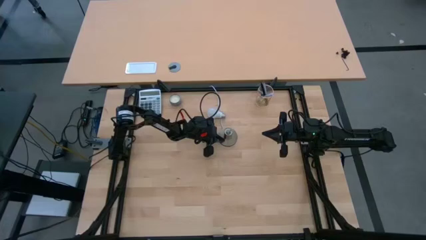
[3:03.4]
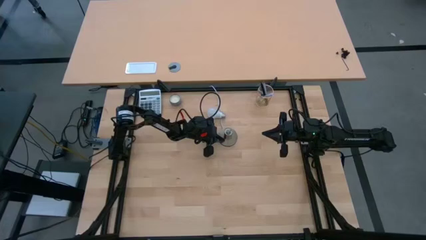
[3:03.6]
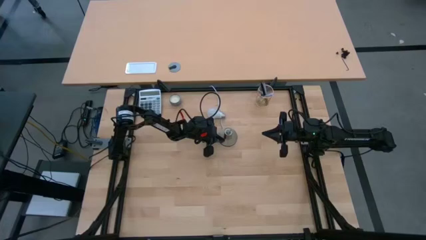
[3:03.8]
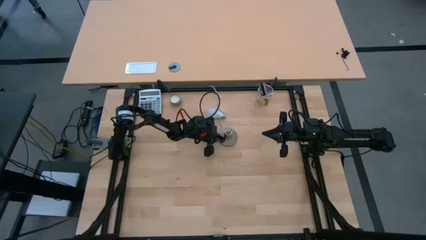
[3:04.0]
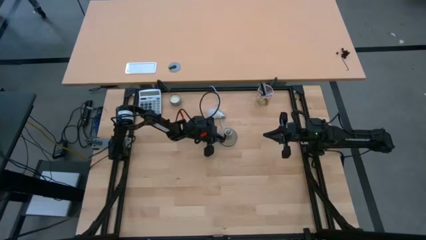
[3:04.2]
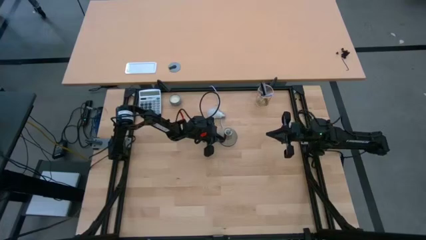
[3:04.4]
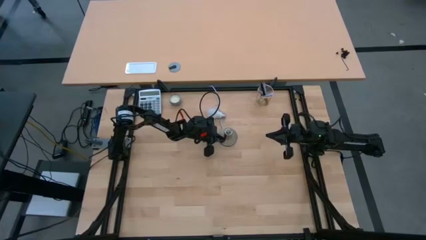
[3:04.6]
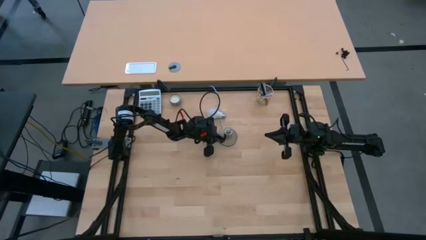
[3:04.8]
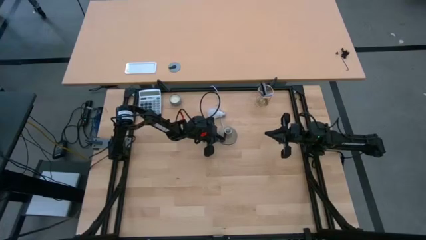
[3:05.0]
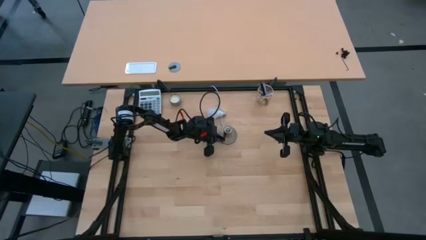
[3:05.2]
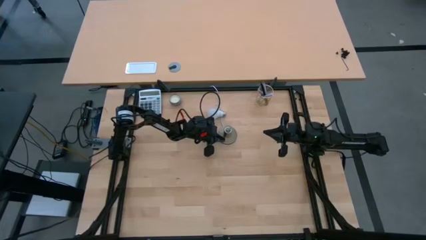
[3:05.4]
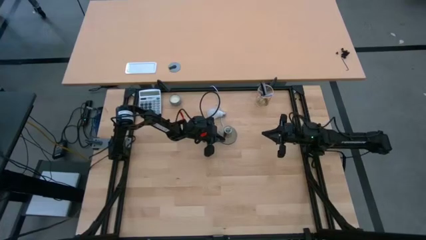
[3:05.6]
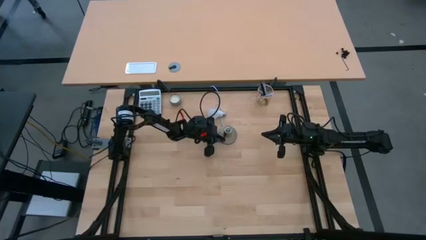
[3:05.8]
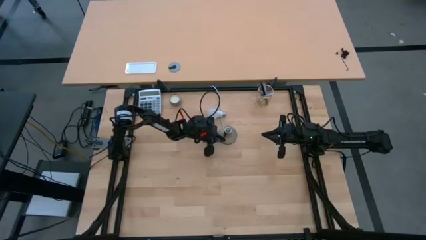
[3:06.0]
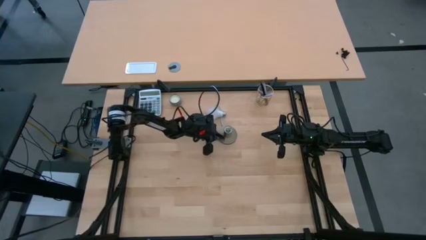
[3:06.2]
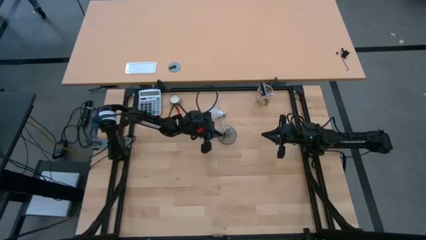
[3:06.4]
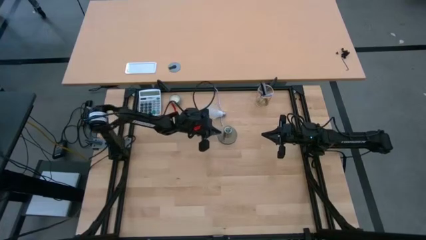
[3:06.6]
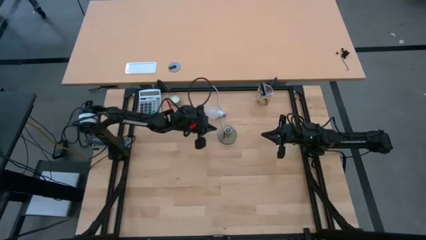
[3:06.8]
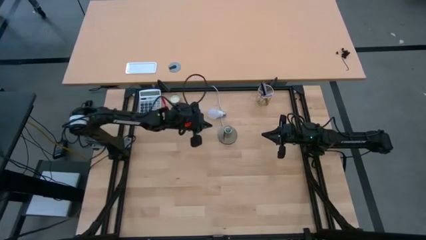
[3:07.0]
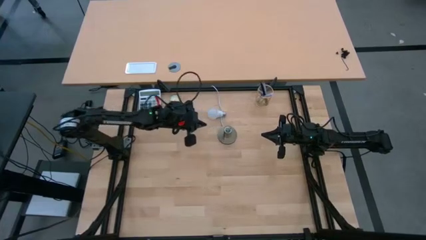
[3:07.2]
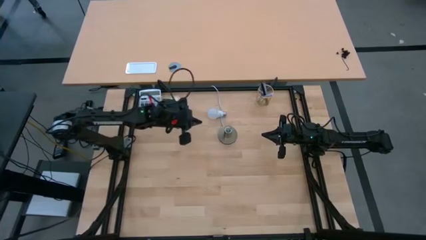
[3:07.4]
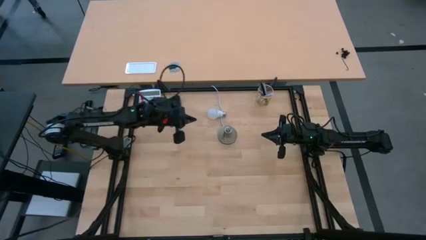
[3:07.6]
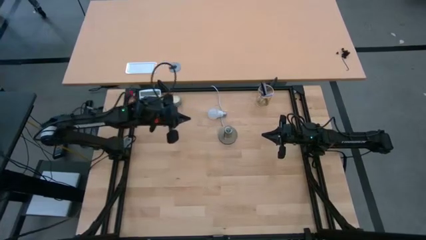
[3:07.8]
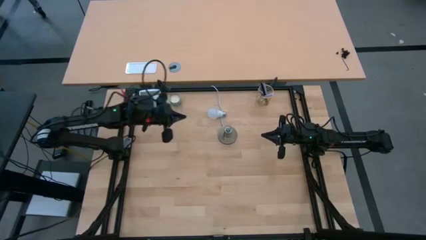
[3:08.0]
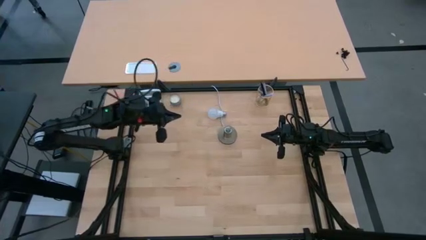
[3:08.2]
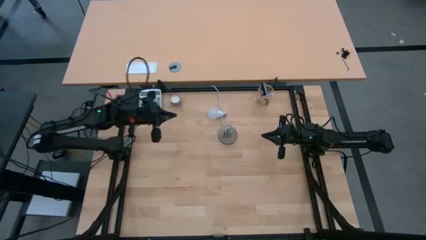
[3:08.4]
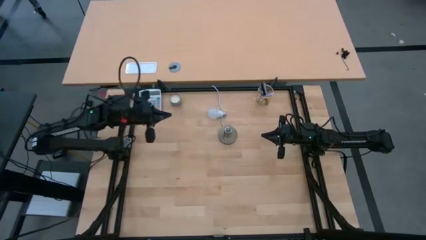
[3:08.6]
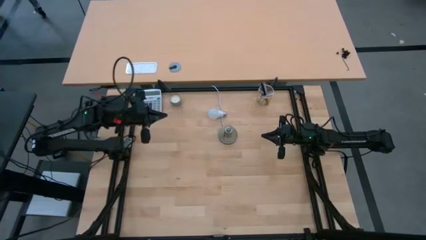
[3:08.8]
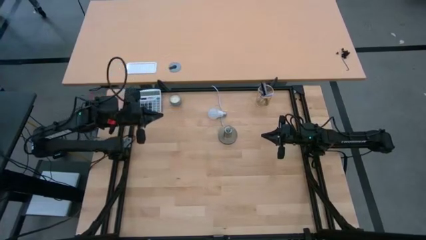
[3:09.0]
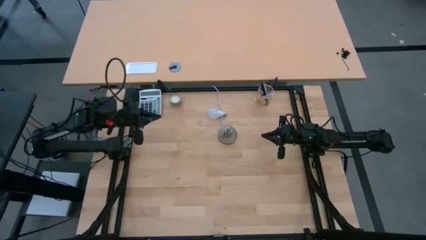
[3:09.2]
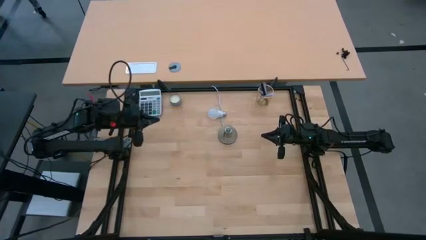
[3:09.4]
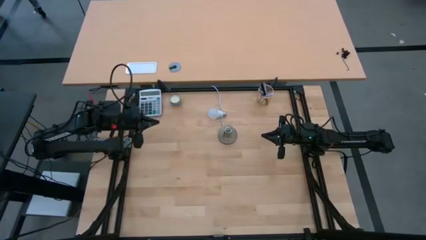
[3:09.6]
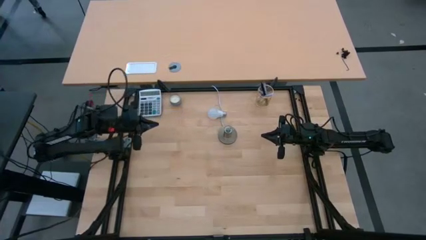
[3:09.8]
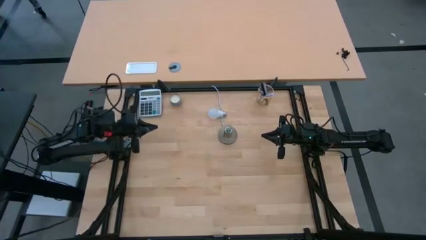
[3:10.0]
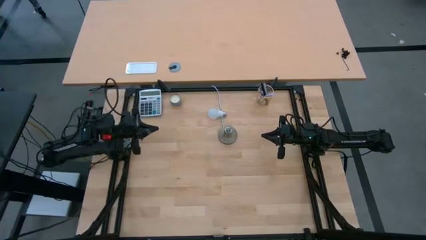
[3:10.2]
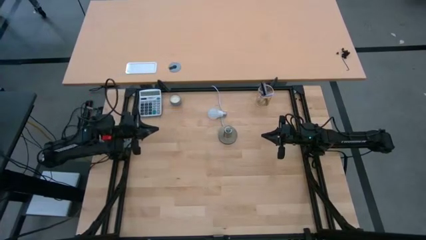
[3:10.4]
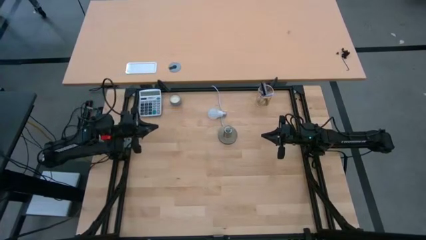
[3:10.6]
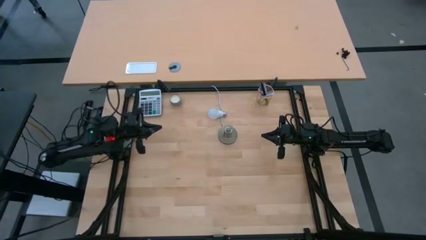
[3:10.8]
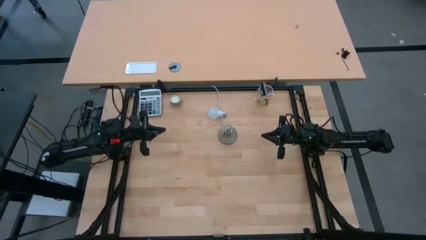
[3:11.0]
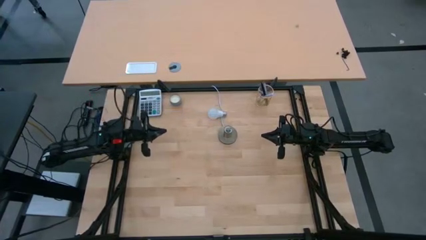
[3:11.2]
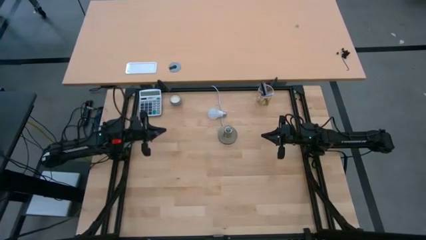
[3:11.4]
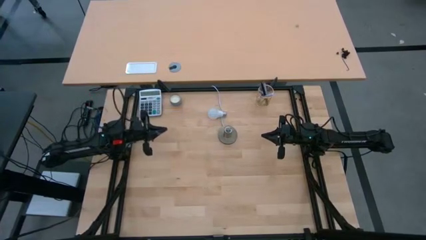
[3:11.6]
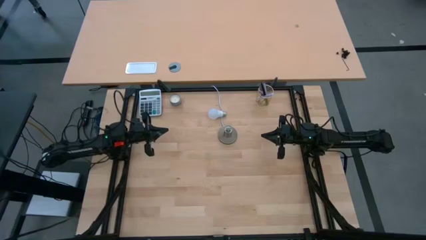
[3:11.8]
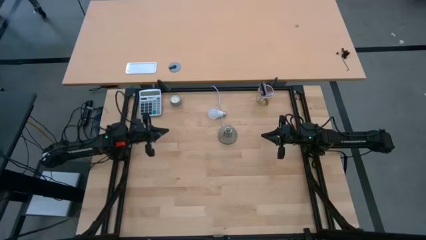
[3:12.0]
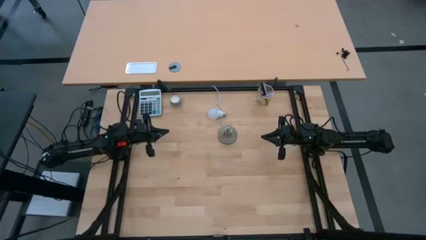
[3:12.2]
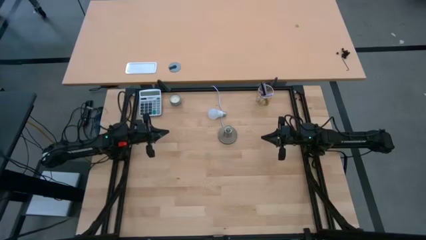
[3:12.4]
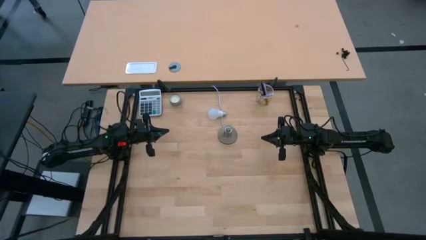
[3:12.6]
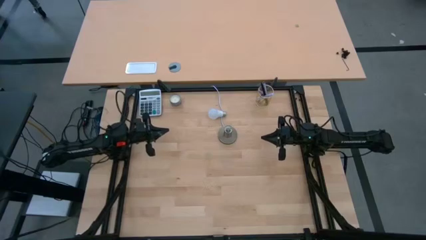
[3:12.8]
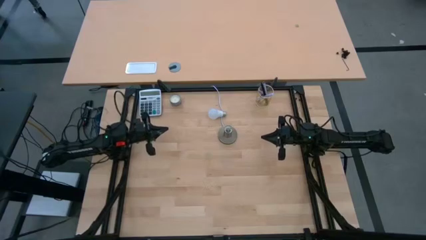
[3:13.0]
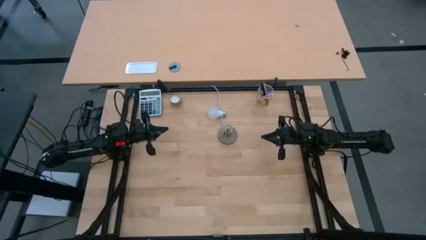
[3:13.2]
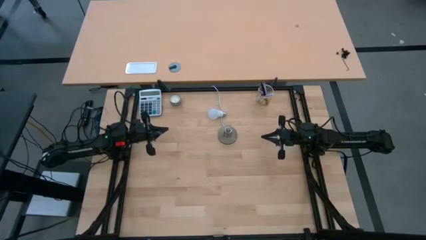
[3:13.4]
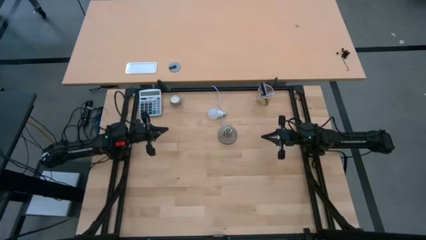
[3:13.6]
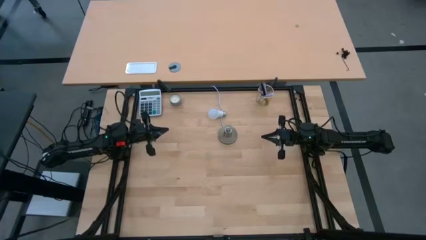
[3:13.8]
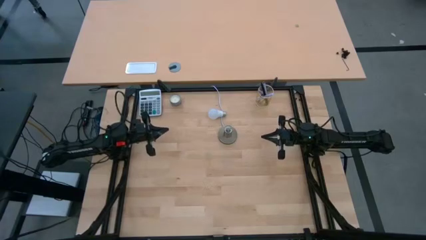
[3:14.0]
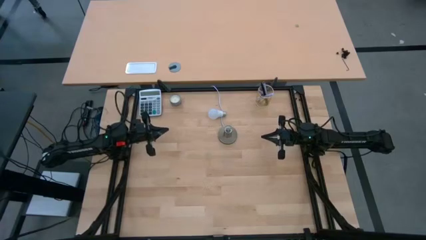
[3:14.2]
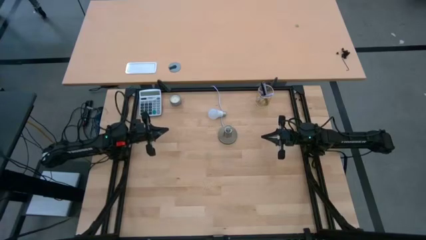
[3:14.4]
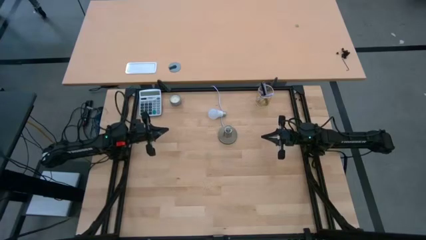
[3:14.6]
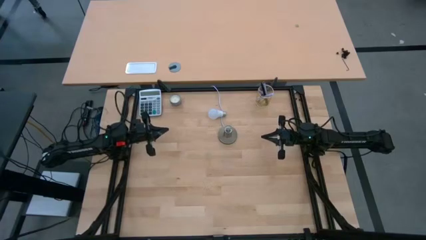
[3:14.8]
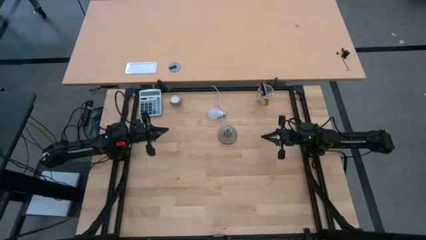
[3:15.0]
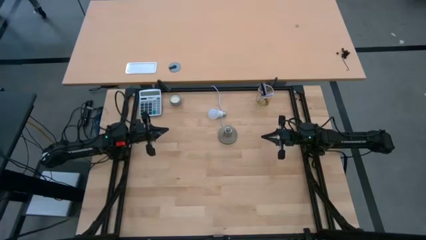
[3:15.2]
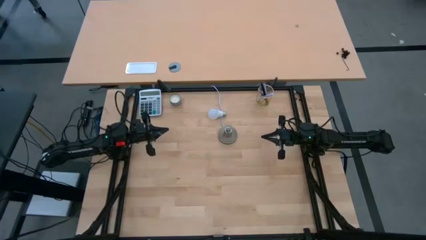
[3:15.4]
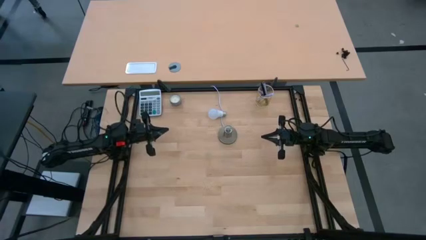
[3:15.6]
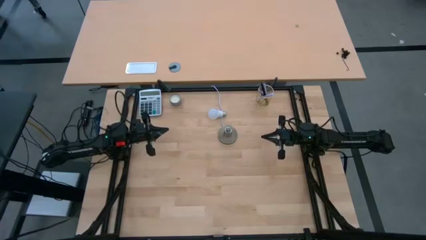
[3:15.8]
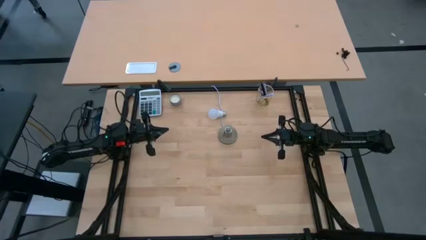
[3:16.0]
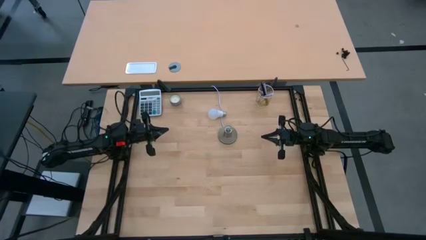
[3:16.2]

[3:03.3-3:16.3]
Task: Screw lightbulb
Return to Home Position

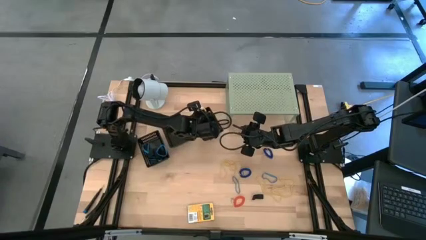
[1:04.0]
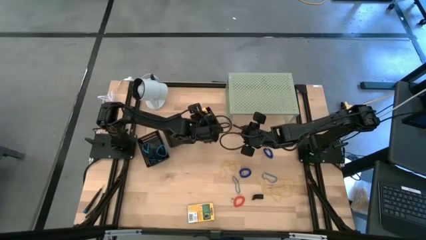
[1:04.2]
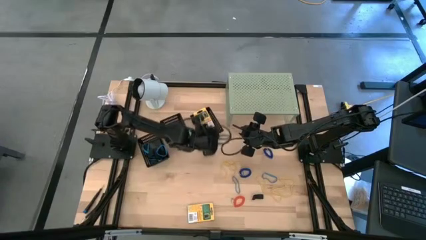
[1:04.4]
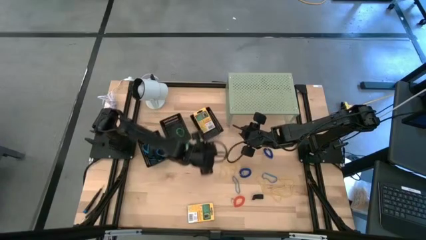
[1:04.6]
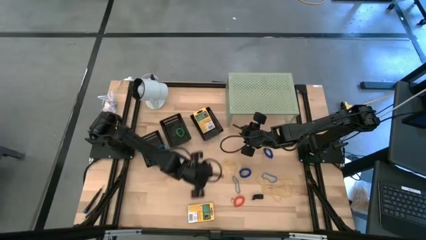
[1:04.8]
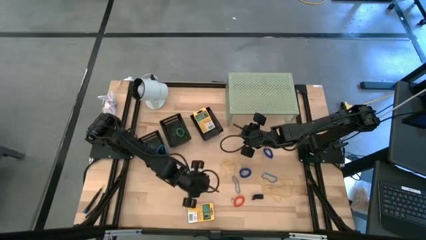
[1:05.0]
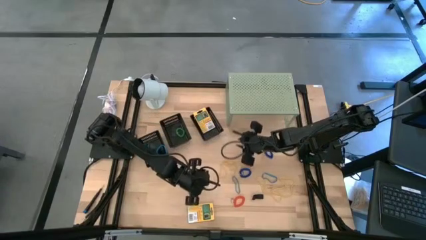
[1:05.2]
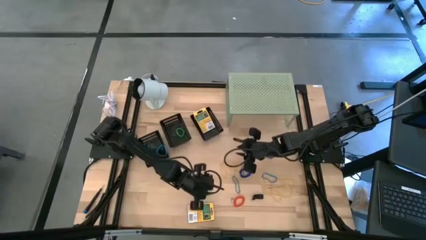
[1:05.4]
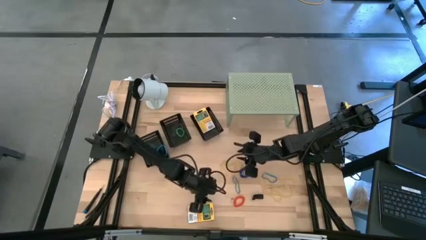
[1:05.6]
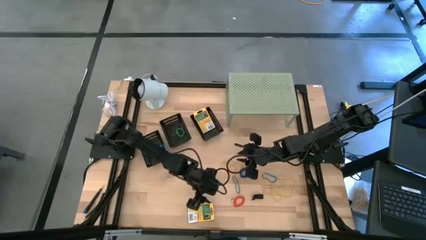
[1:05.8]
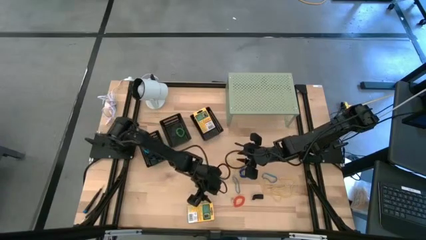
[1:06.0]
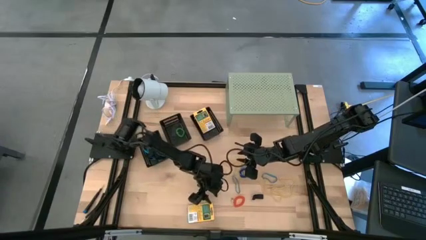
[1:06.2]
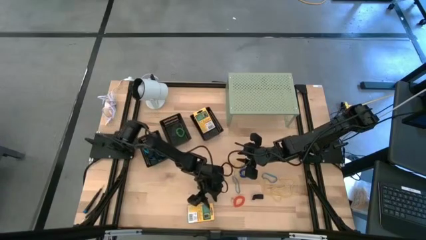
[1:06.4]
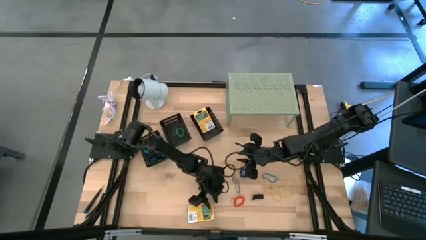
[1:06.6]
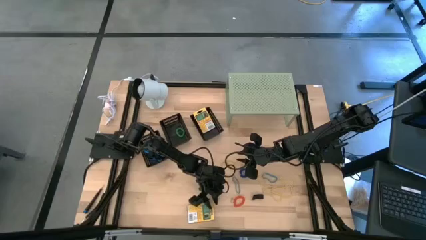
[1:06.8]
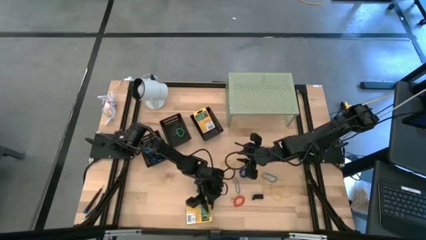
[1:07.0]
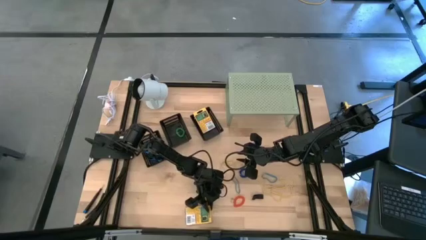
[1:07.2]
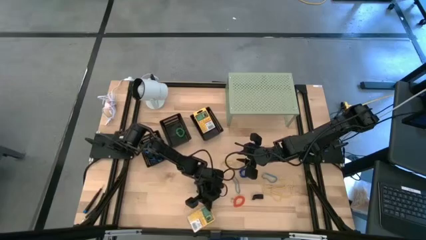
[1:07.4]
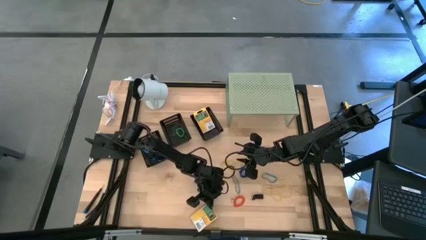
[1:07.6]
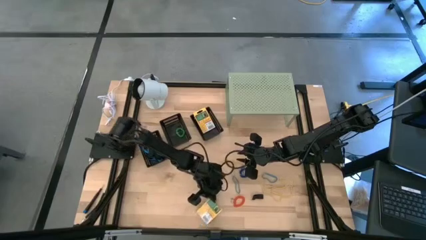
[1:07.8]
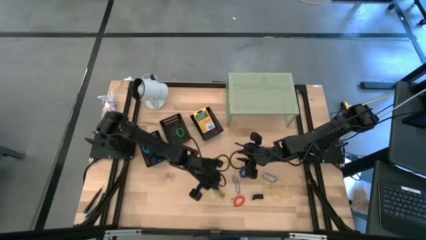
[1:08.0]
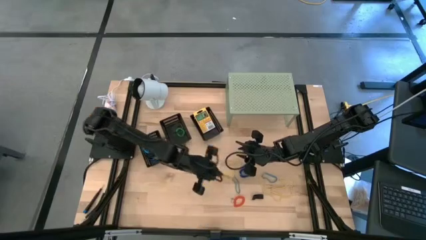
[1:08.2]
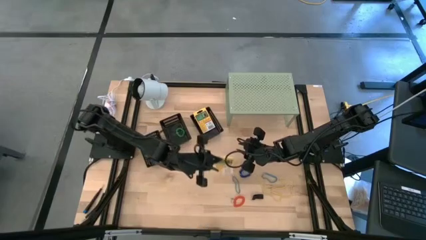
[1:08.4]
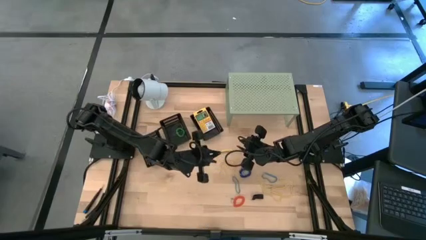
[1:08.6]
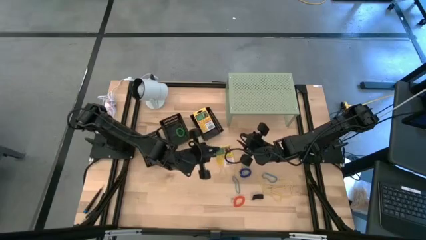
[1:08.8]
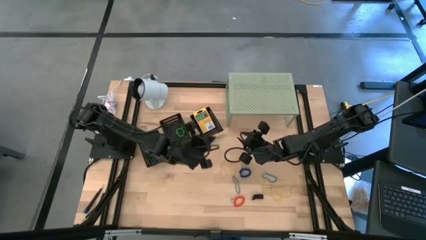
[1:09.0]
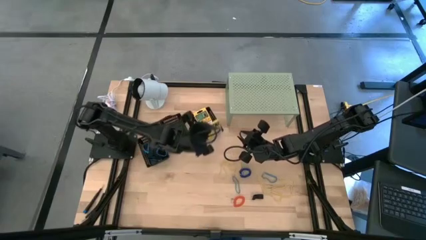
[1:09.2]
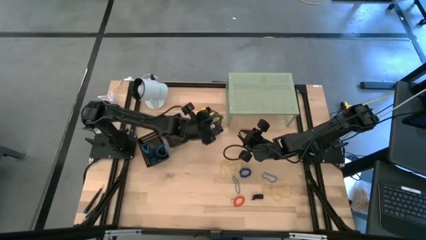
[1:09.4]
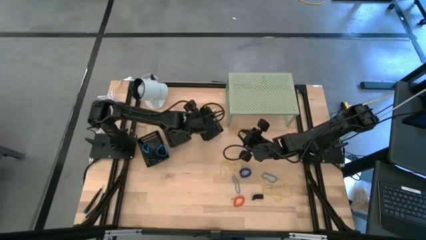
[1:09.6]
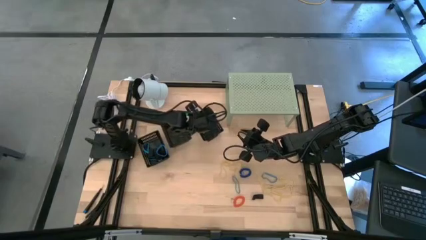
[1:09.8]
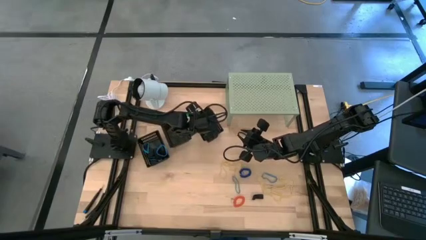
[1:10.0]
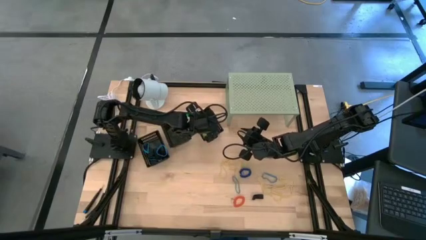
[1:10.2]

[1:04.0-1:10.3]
Task: Pick & Place Office Desk Supplies
Put the crayon pack into the right black basket
